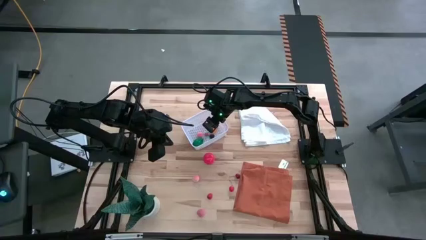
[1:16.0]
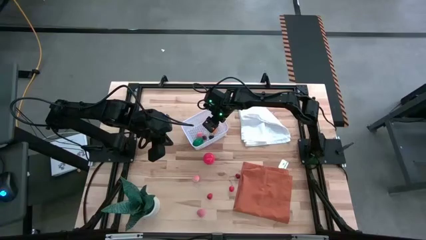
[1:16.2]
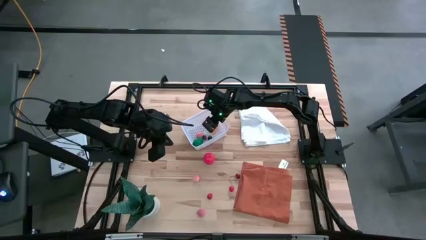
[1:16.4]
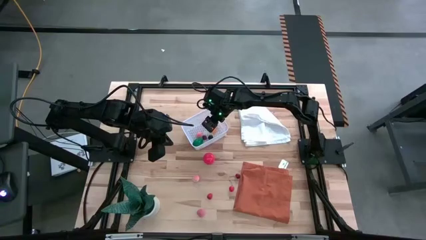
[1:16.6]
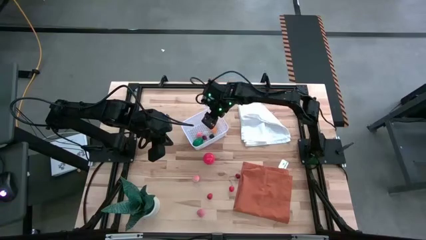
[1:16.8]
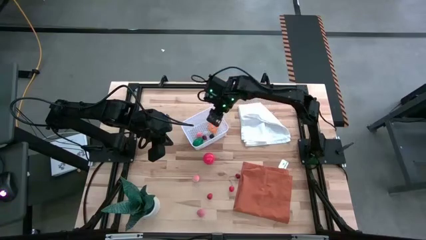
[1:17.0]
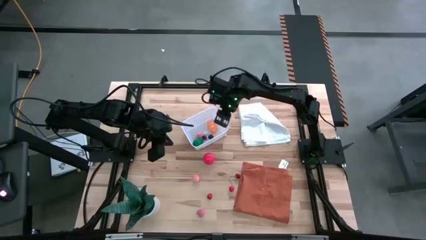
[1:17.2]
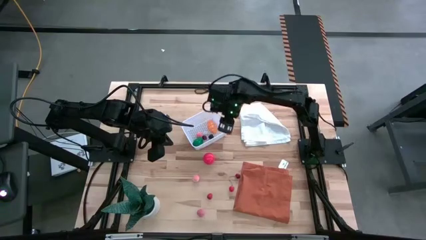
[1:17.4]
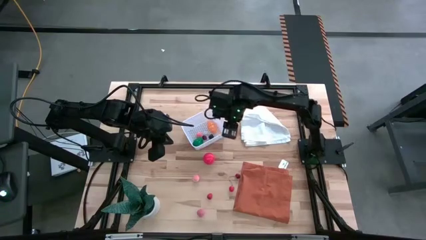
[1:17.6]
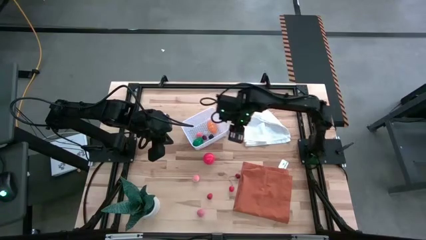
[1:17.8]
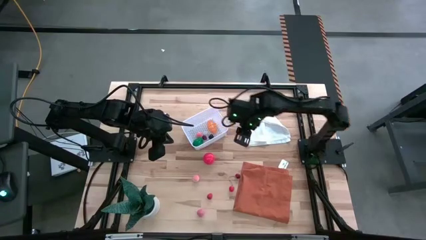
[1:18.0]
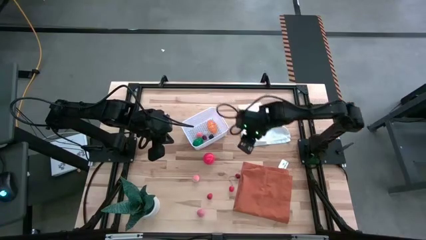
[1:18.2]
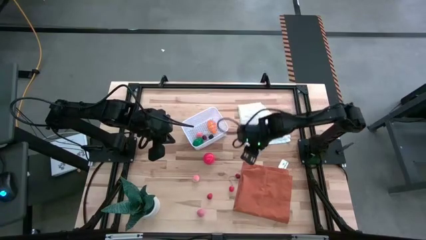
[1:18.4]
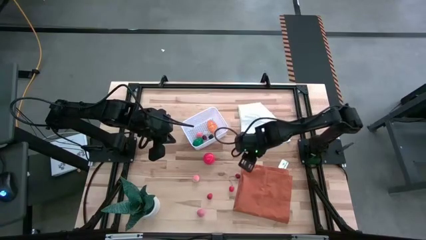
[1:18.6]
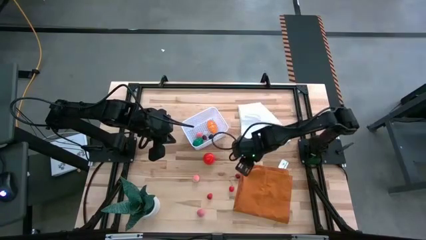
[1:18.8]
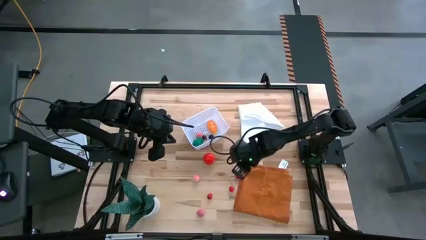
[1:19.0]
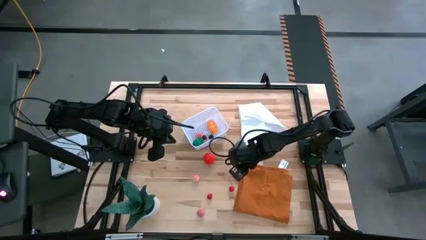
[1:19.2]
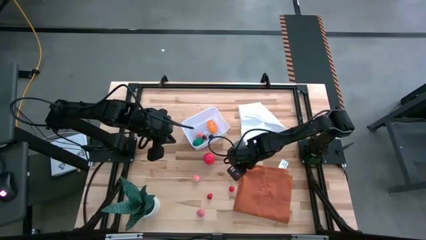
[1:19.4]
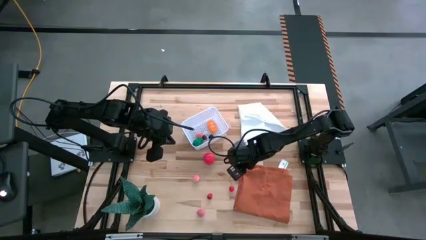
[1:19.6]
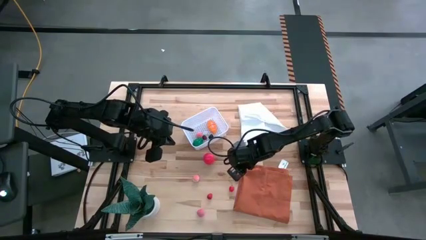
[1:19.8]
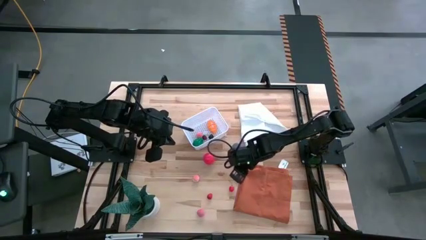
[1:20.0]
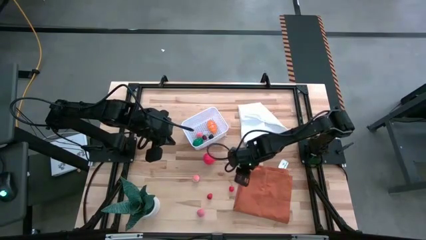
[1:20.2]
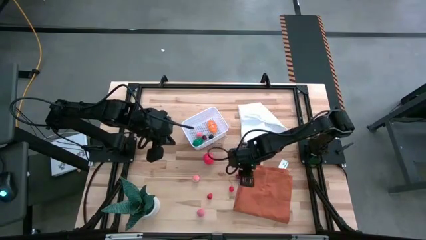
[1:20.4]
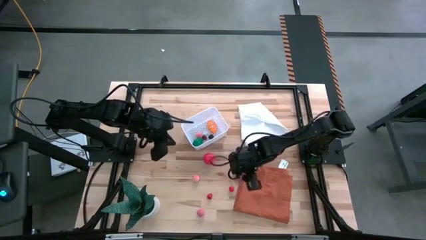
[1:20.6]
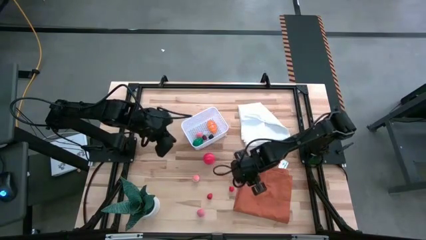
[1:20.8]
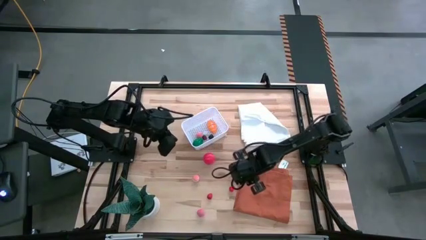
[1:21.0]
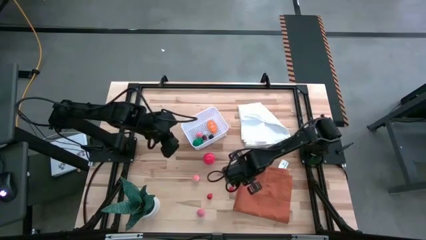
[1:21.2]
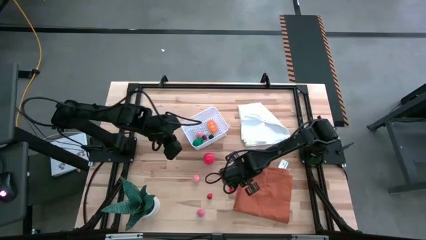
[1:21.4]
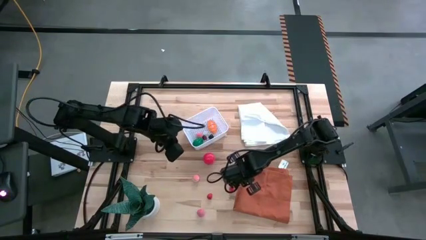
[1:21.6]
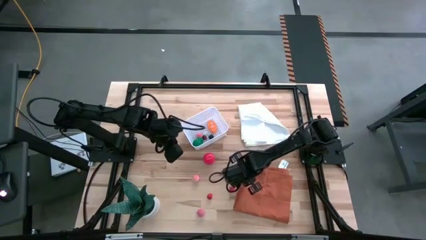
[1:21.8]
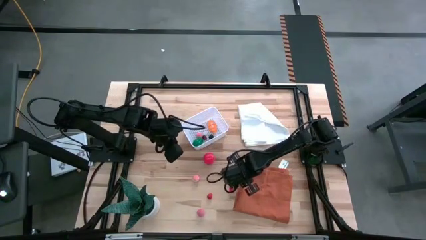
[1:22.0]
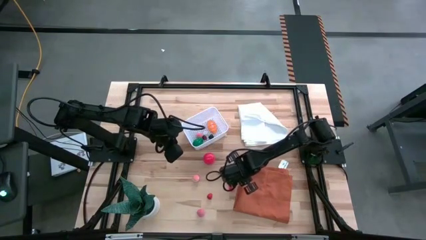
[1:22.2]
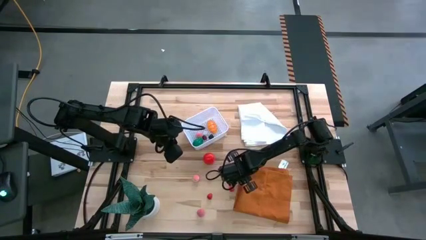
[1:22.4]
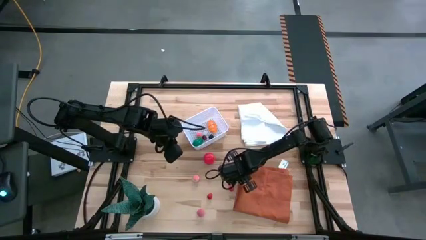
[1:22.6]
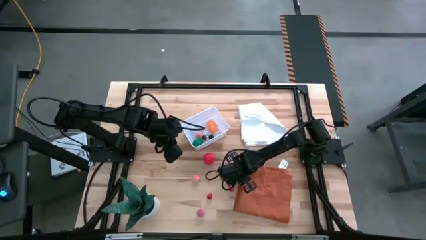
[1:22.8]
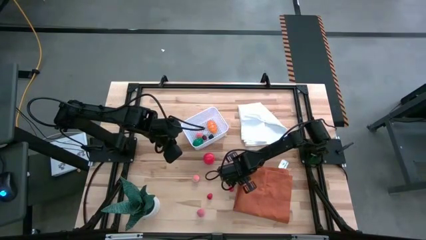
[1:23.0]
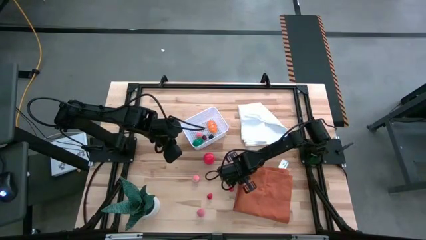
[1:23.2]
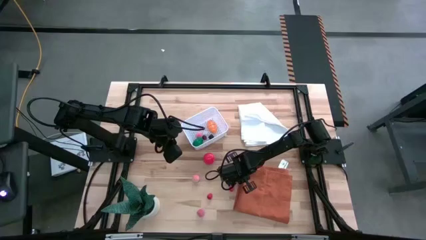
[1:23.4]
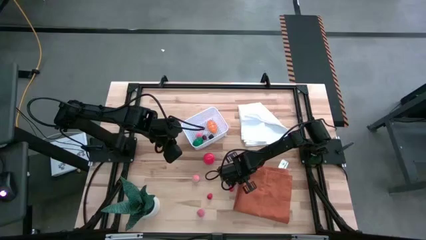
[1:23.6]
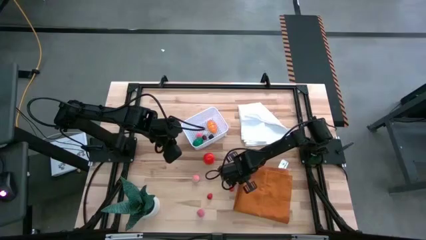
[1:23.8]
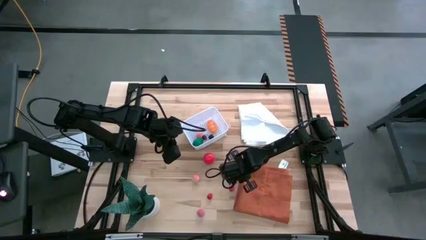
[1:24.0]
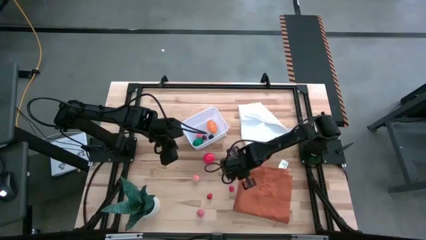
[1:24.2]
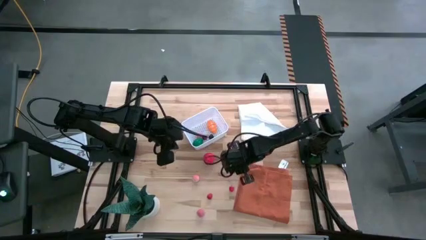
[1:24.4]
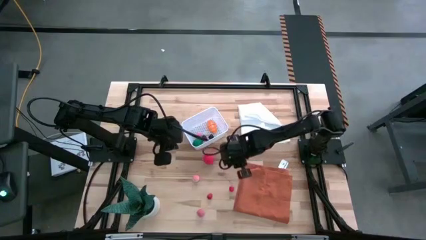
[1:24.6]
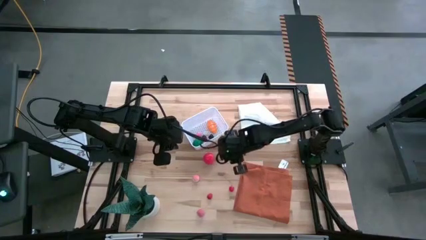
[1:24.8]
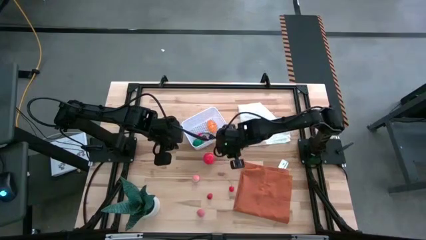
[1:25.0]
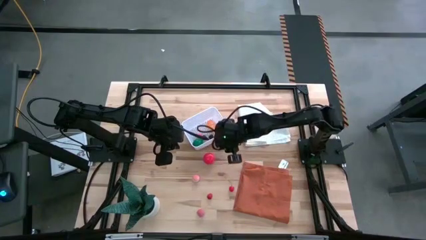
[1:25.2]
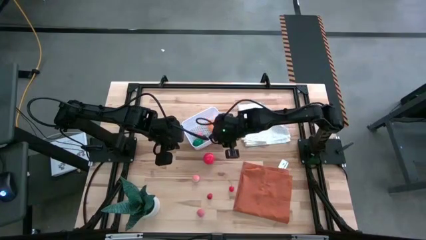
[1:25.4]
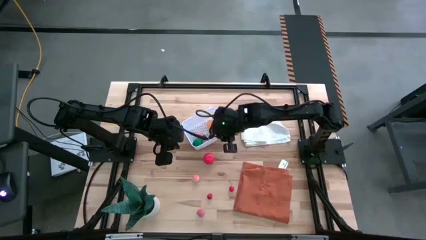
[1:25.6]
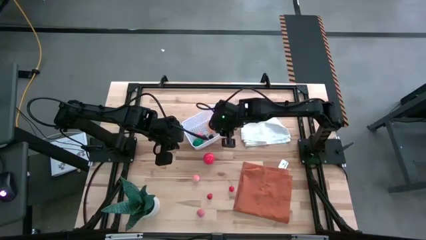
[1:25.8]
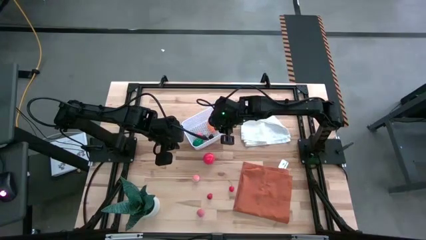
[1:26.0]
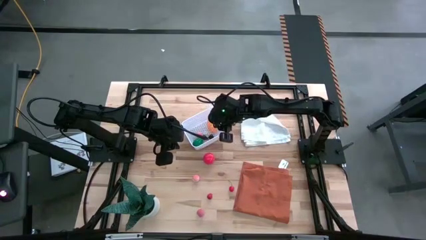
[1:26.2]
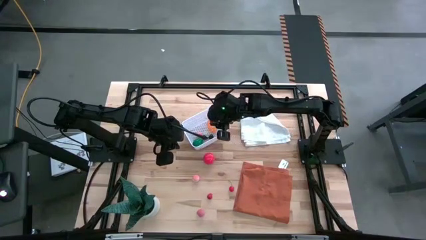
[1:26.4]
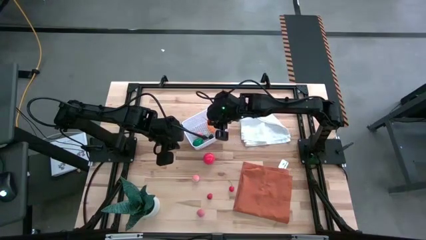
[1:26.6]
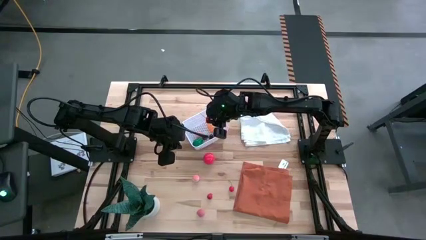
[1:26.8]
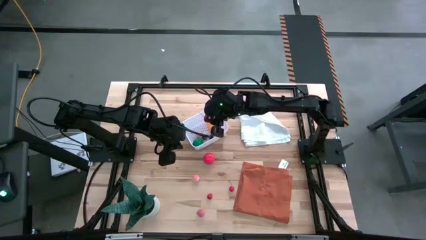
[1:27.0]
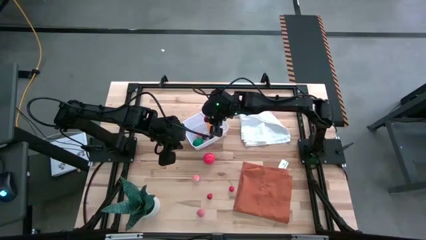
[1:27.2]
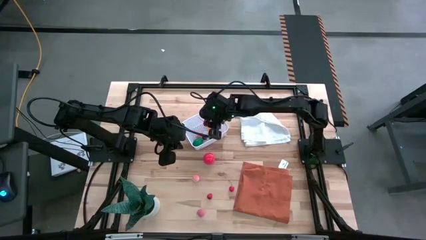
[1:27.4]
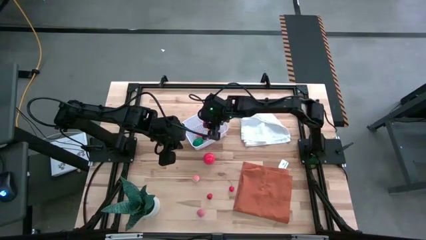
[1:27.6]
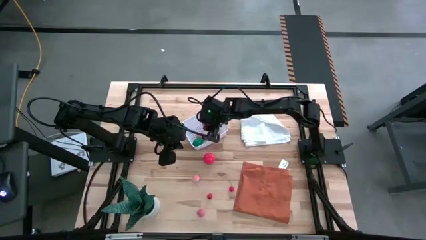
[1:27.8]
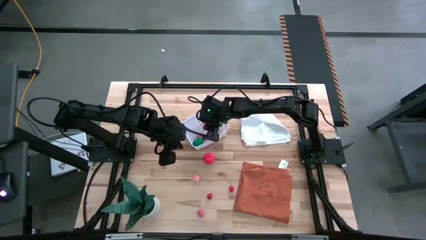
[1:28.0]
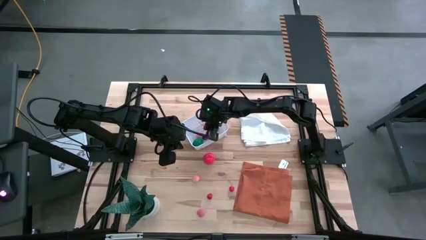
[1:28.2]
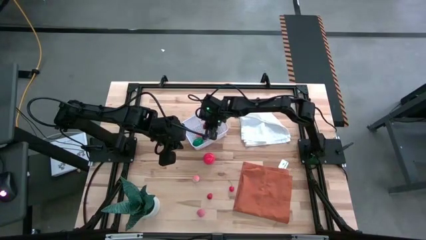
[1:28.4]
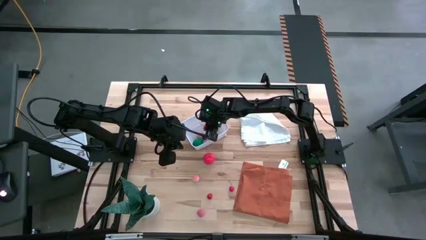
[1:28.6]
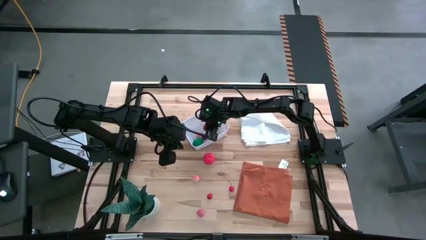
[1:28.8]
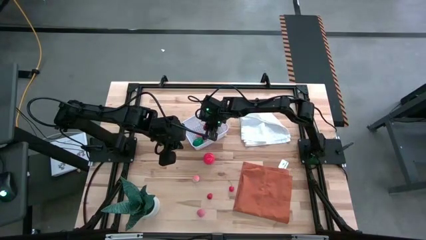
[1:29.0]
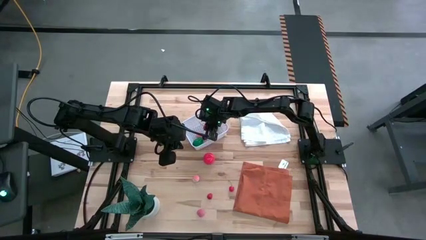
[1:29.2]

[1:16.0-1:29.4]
Task: Pick and placing Produce into tupperware
Put the top red cherry in the basket

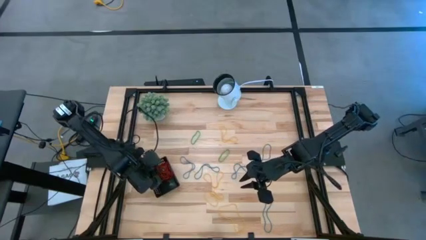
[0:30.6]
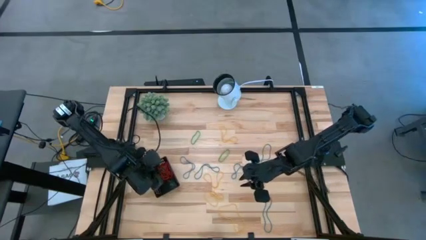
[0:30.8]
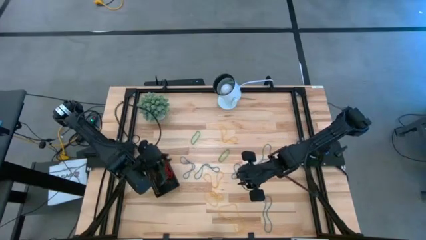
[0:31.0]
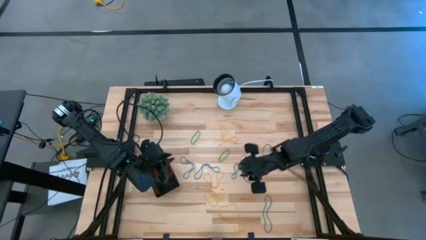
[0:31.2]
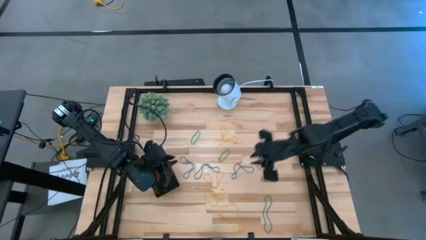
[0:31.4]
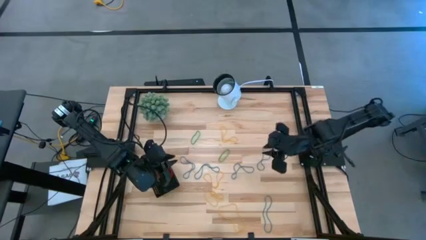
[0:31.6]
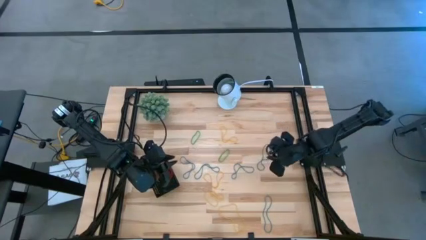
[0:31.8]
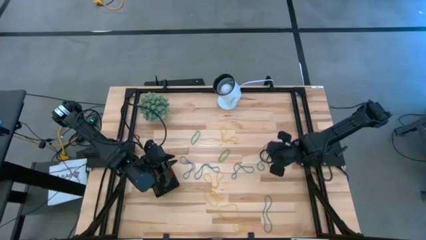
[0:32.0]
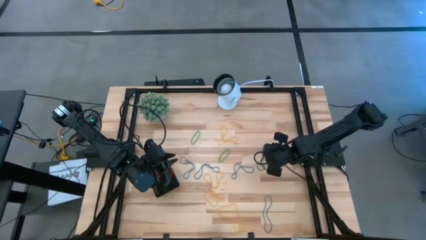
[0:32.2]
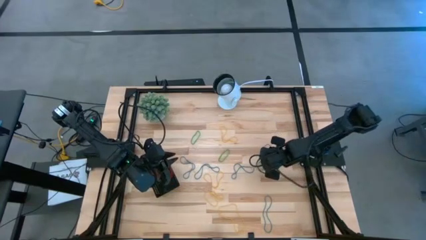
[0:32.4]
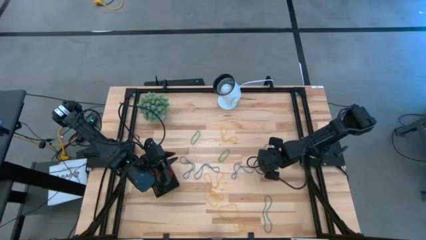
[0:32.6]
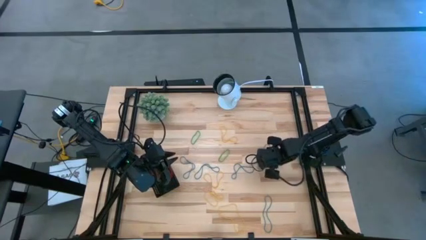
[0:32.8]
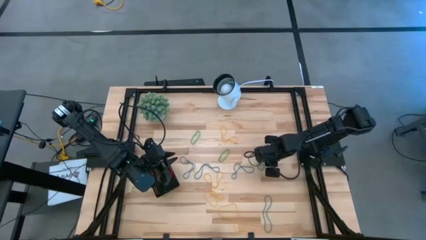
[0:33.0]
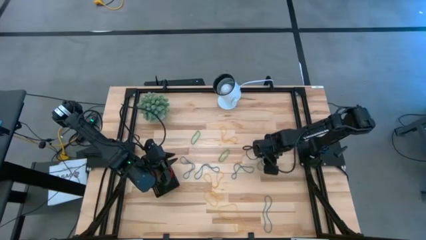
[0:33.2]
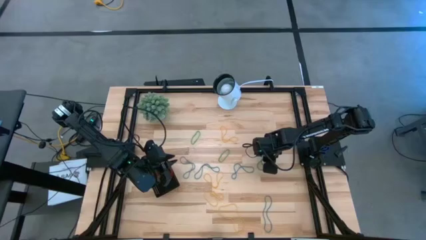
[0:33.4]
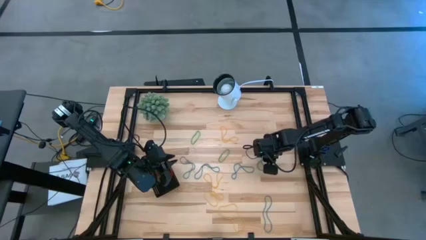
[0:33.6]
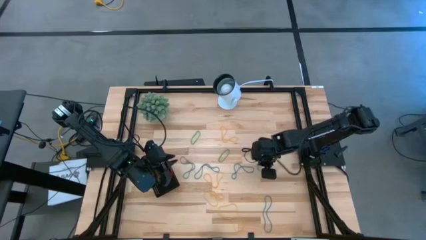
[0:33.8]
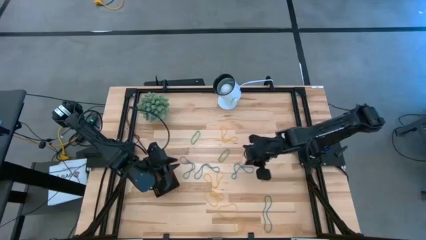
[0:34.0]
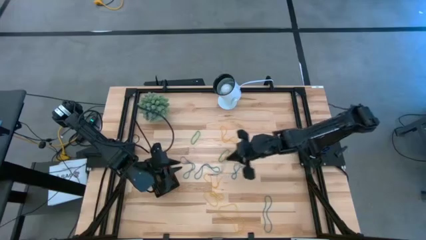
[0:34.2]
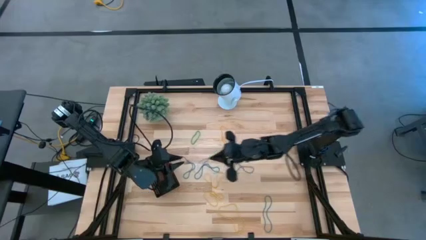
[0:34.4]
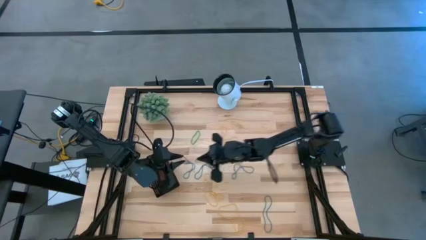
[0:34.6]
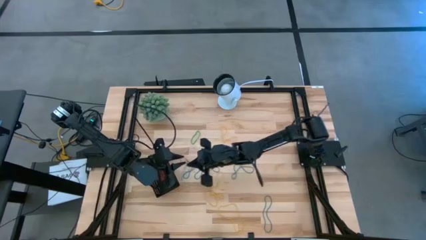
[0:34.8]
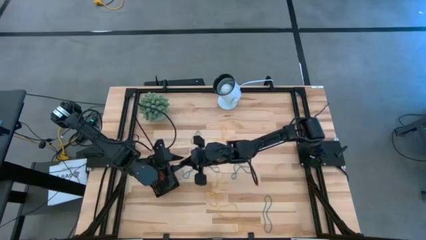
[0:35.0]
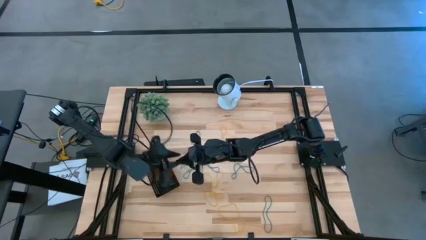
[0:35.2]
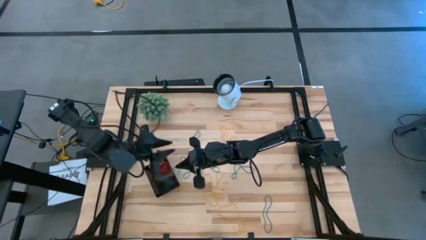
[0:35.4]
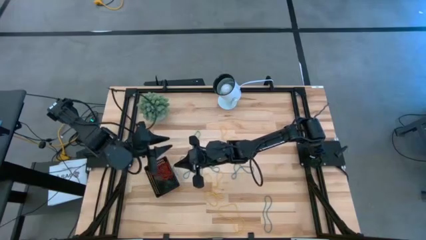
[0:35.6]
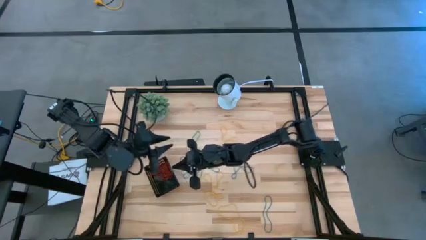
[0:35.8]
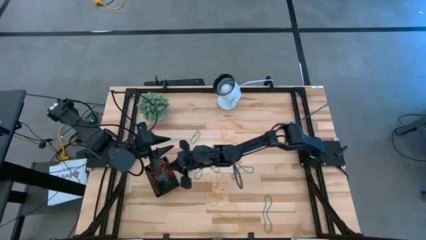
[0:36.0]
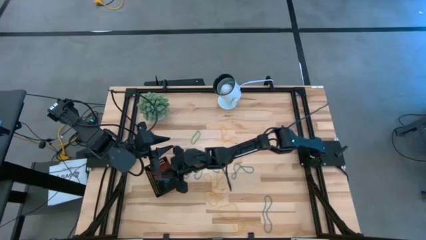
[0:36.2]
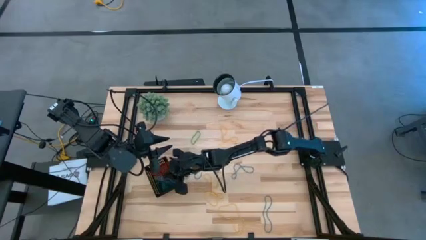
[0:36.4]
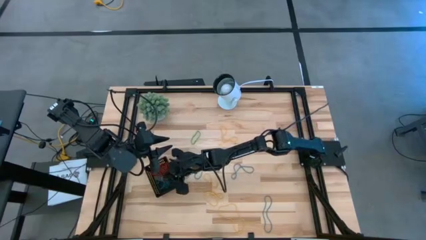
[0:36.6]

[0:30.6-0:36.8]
Task: Pick and place items into bin
Put the blue rubber band into the black bin
